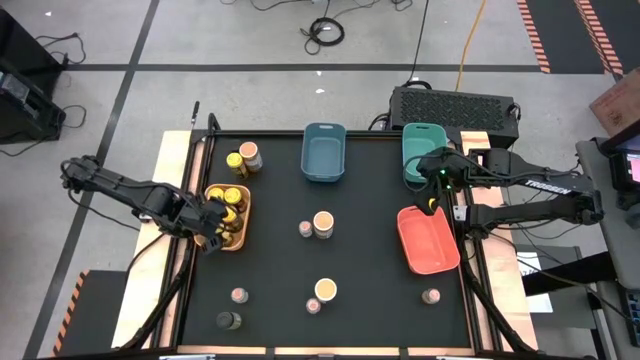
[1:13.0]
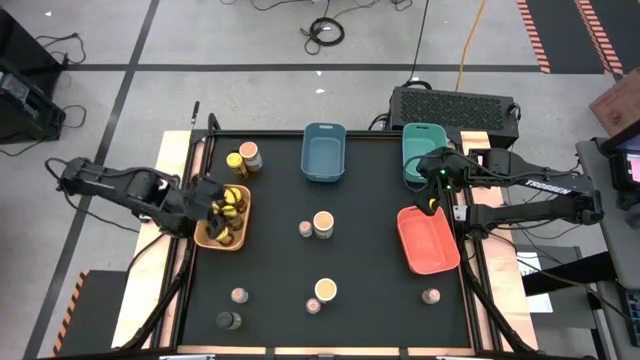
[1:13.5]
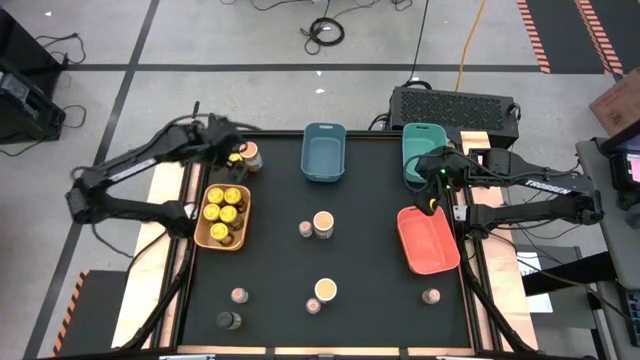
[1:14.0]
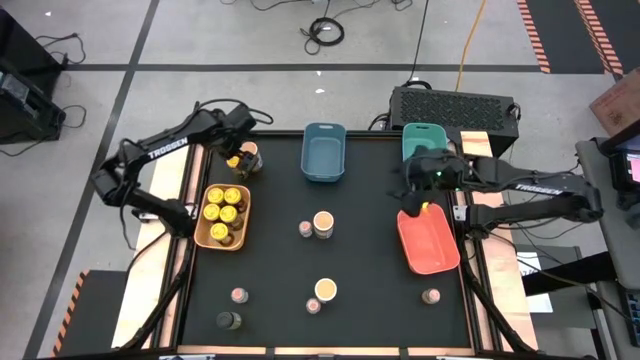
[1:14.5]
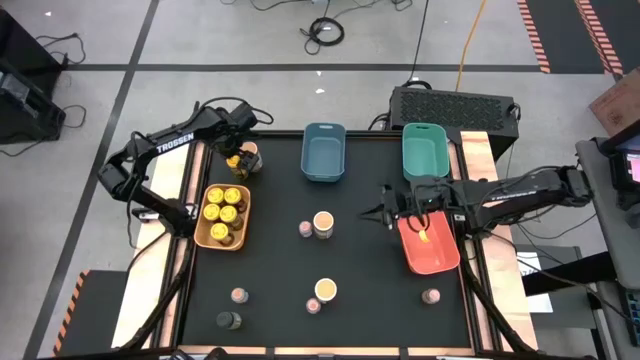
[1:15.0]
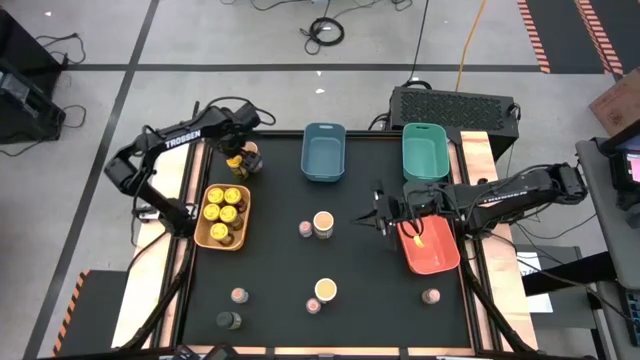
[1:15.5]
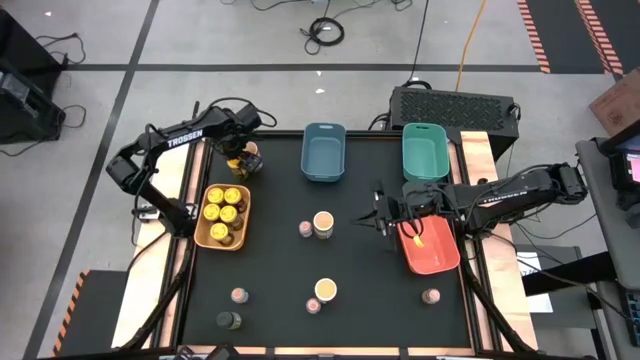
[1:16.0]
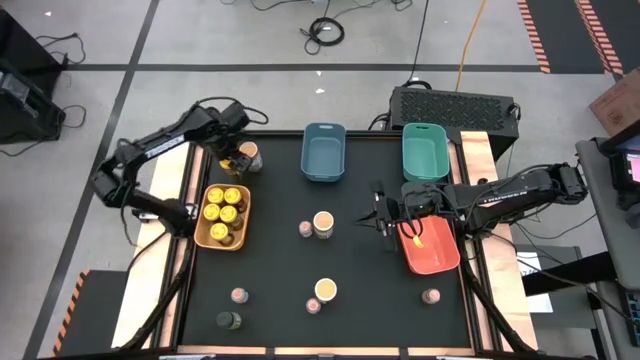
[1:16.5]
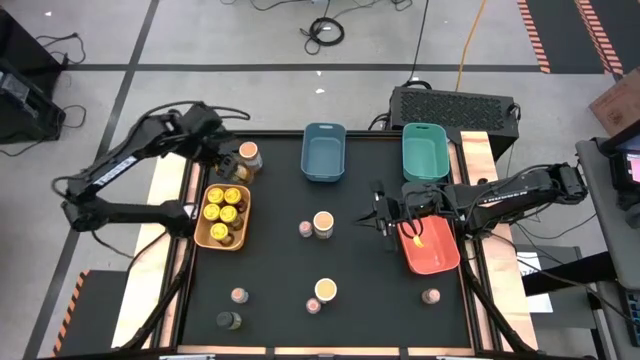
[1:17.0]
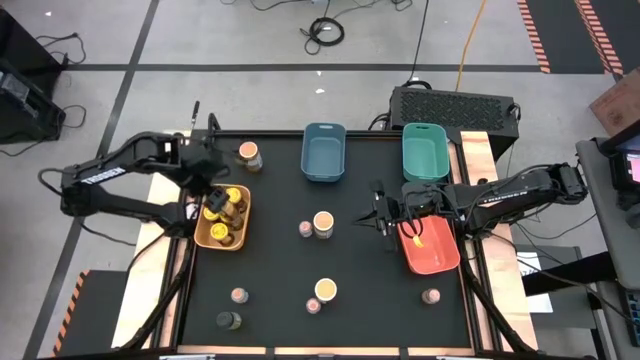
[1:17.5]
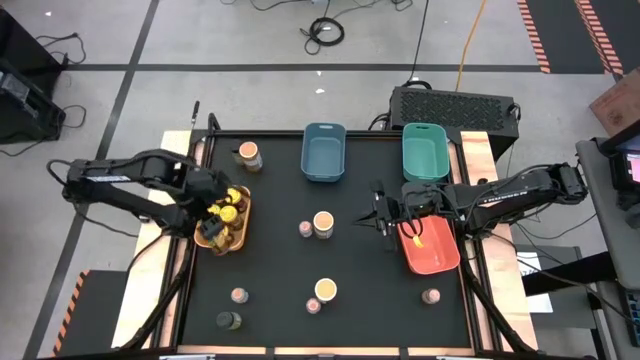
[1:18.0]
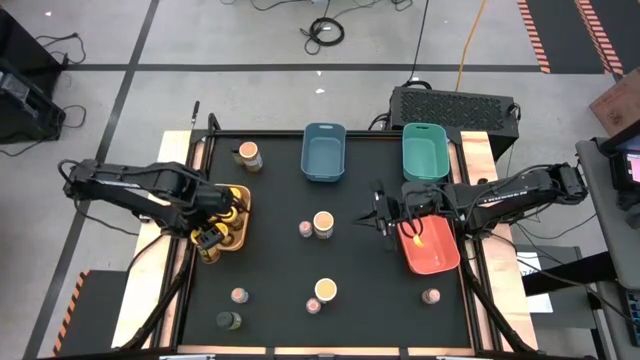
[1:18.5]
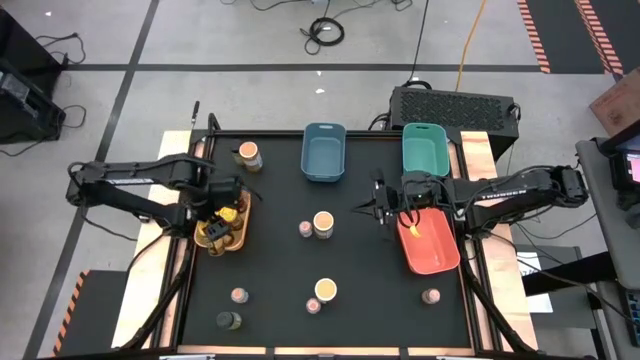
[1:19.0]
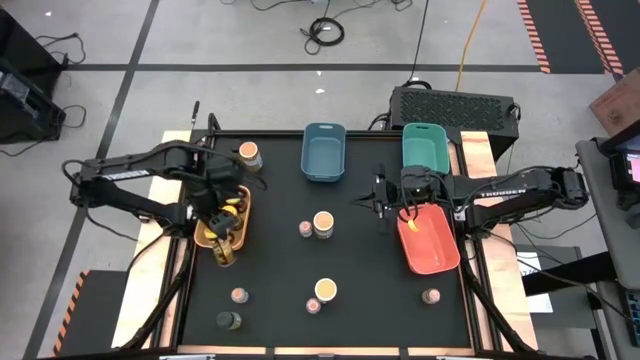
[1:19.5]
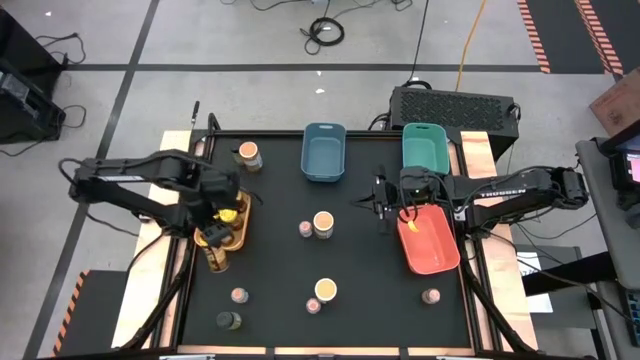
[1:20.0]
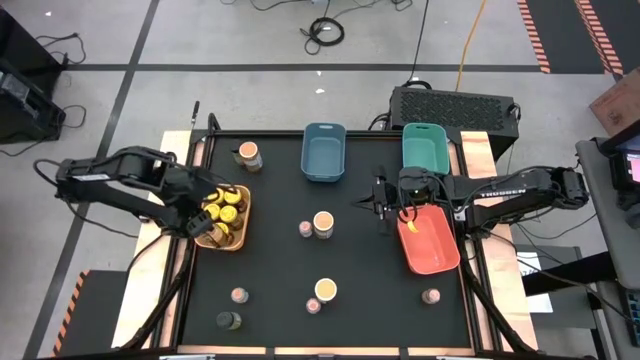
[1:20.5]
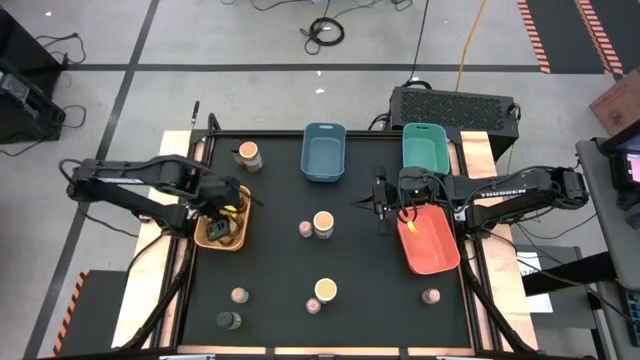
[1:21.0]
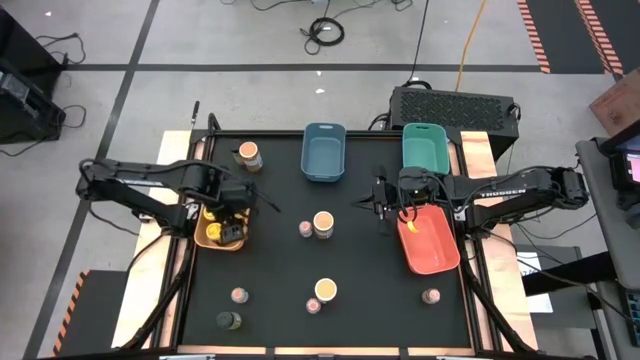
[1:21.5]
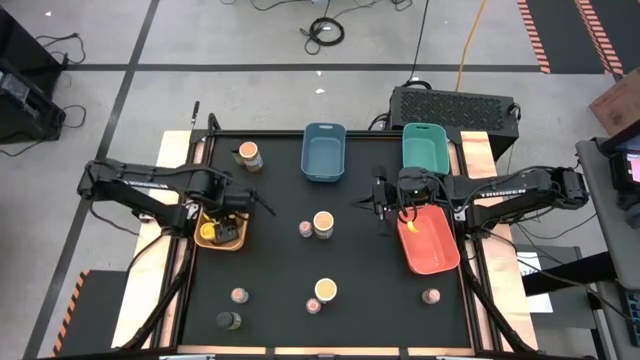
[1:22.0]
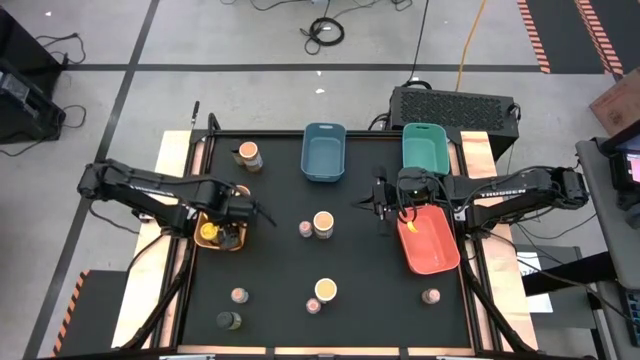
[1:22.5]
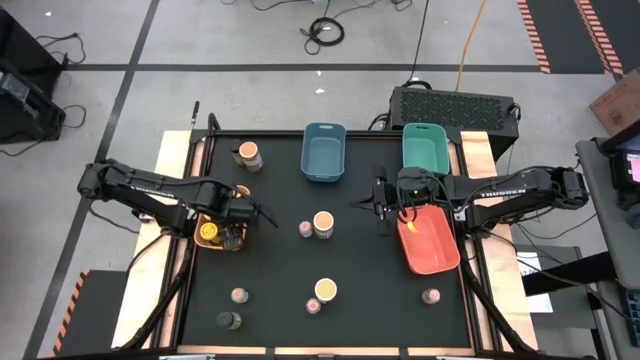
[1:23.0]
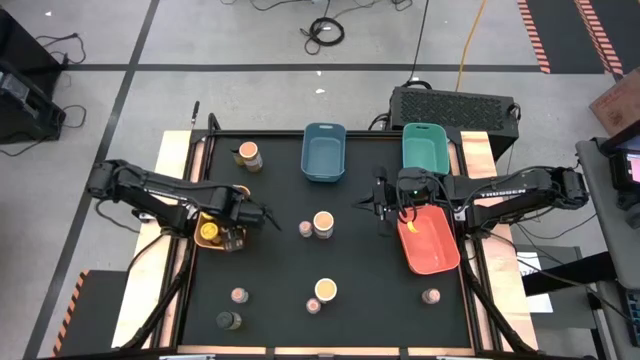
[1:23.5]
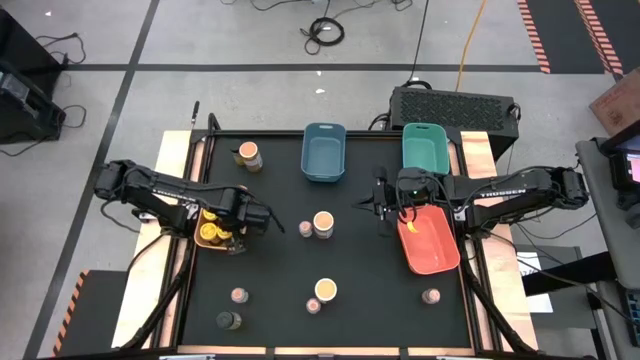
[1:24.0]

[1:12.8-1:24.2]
Task: Sort spices by type
Put the yellow seasoning can into the yellow bin

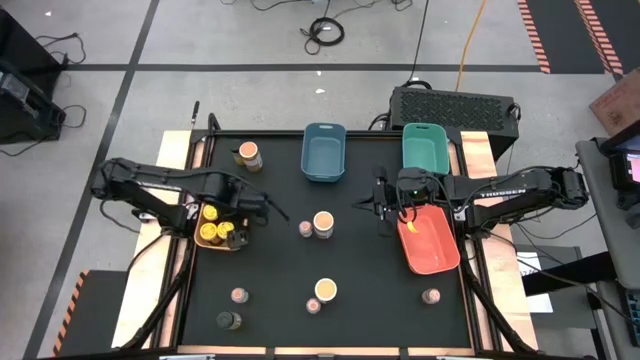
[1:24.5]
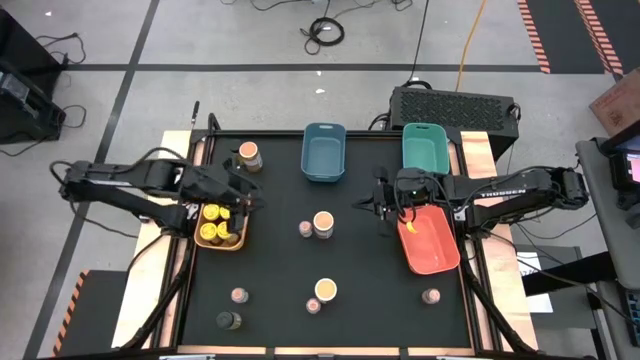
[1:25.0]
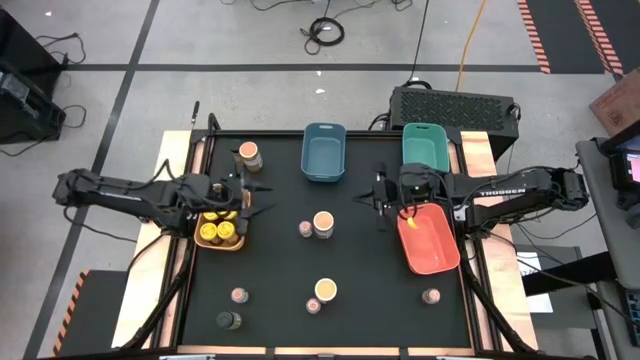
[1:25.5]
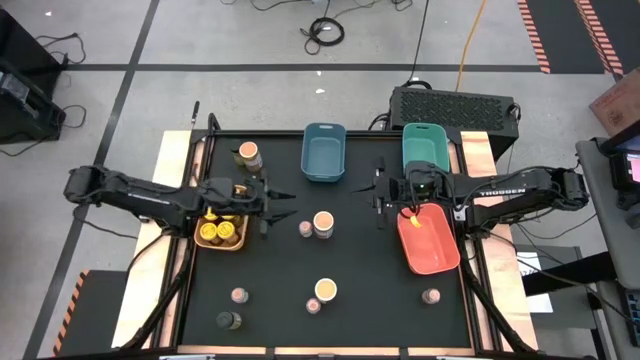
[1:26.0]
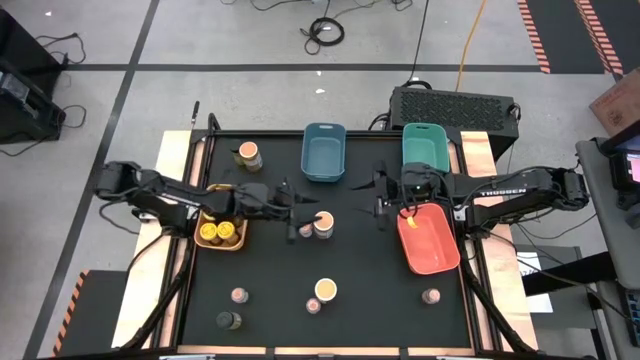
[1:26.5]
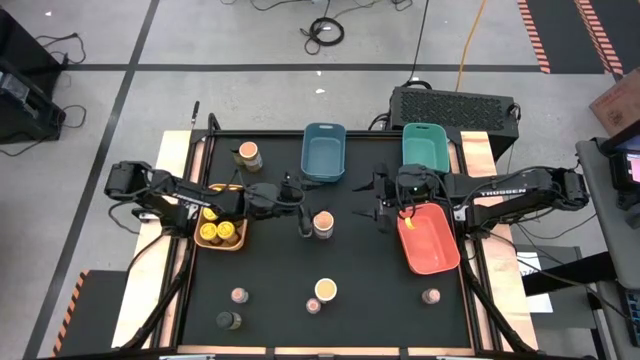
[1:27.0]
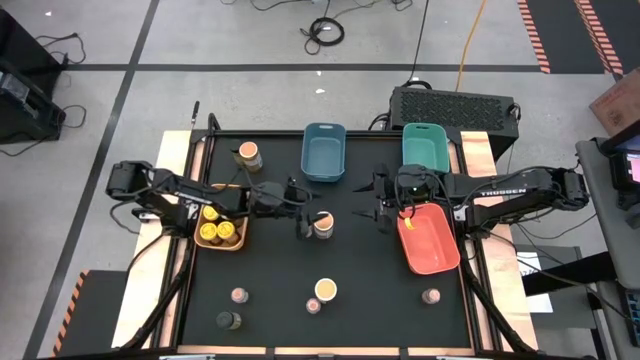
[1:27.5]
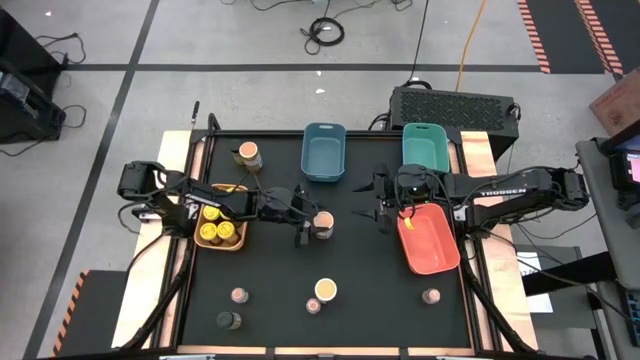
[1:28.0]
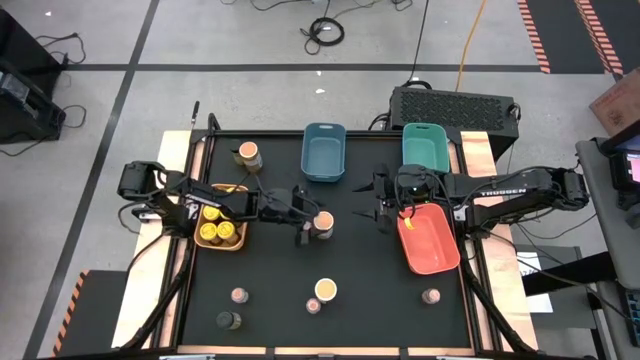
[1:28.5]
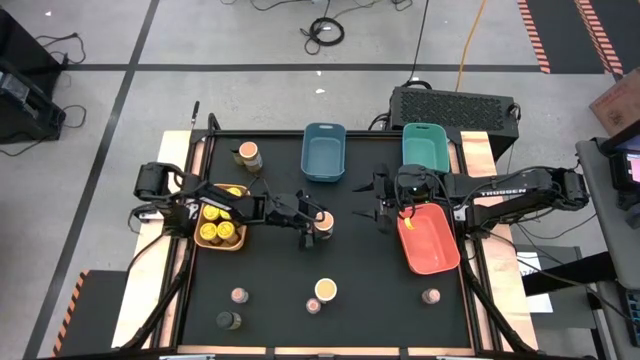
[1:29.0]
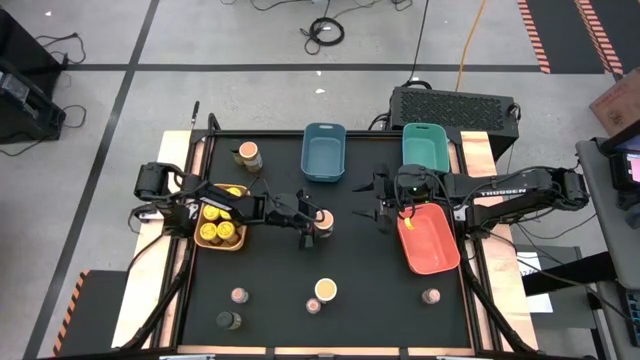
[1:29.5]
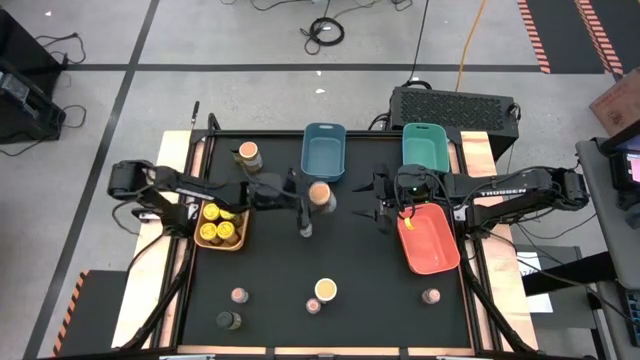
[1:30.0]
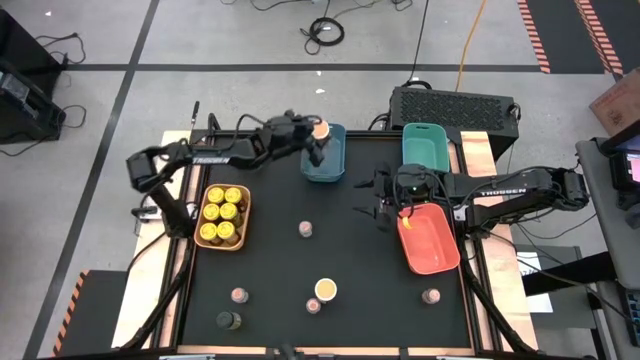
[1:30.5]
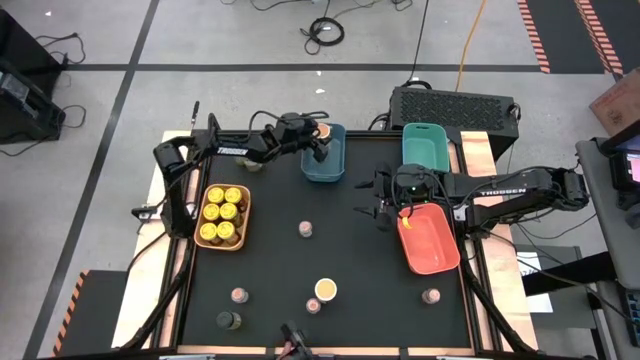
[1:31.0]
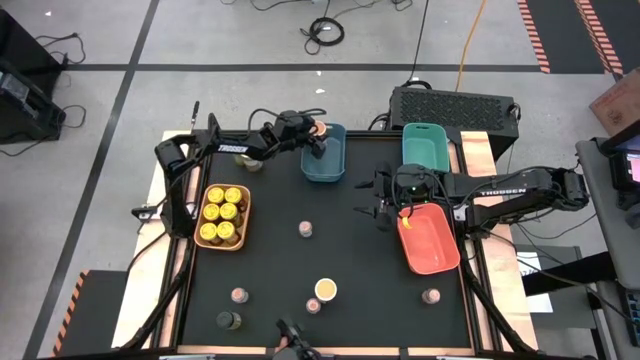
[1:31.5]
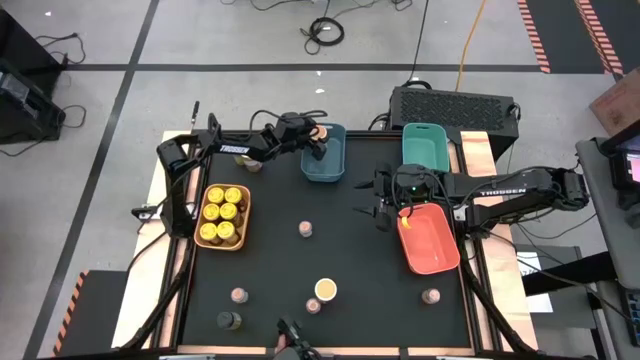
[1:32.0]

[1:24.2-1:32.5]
Put the large brown seasoning bottle into the blue bin

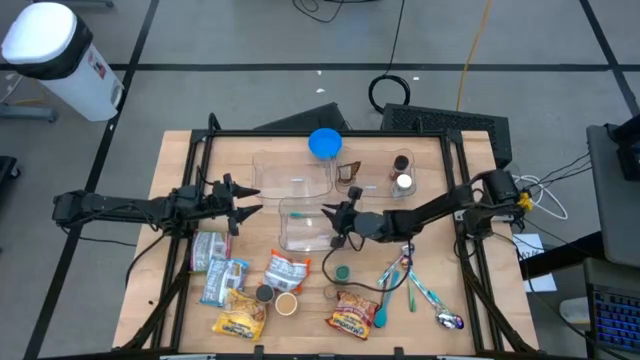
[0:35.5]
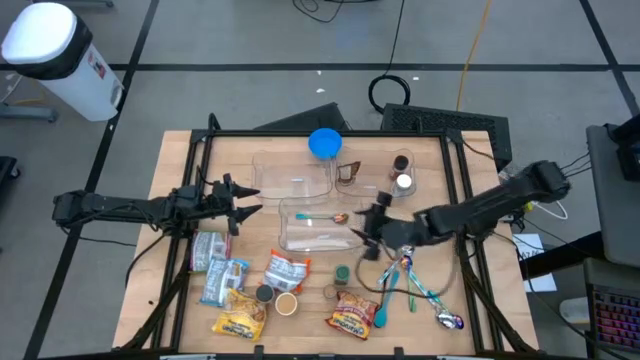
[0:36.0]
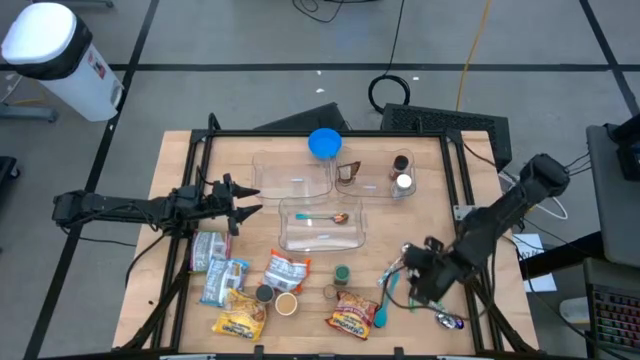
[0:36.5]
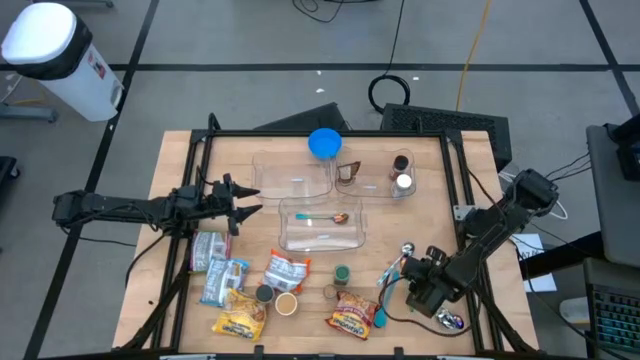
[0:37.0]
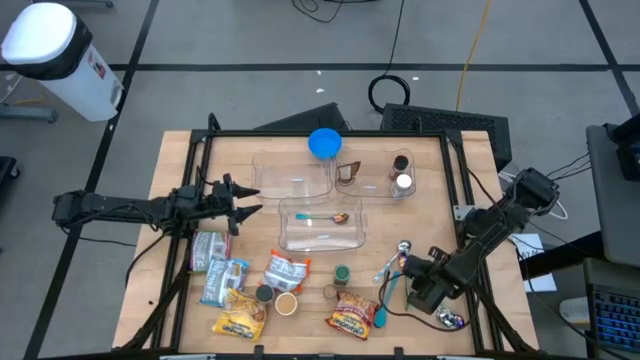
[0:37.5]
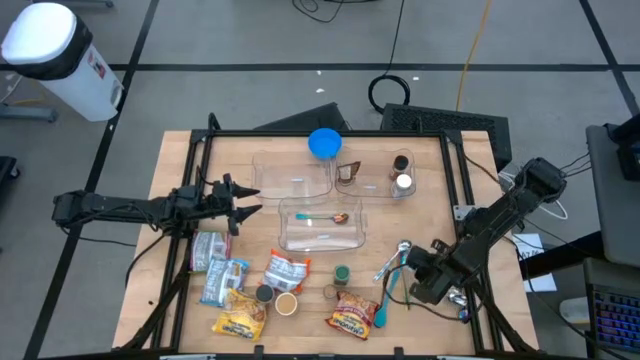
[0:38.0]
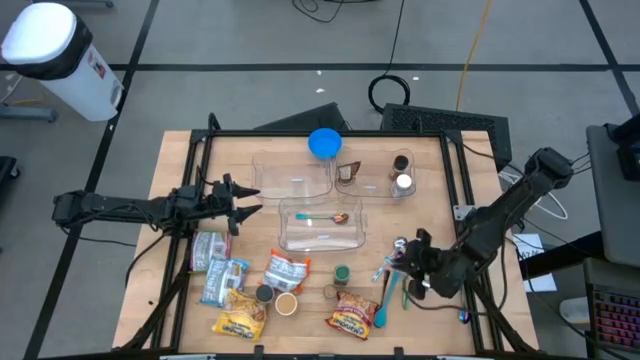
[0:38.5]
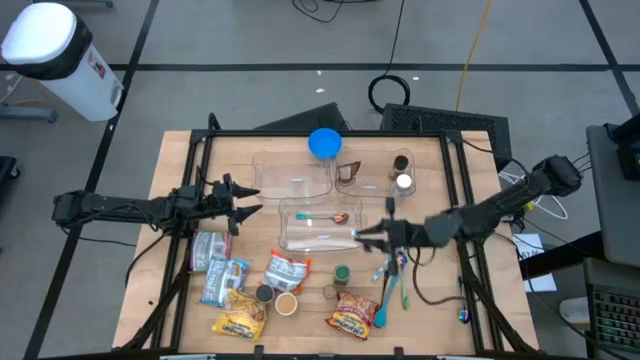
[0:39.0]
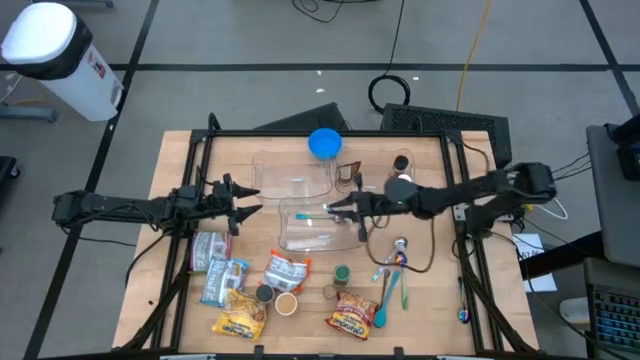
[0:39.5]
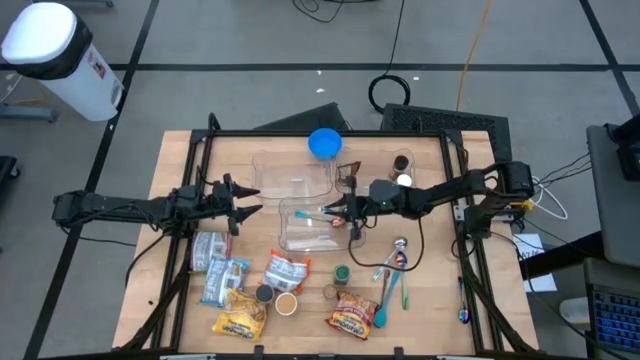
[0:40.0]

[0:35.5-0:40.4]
Task: Pick & Place Food Item
Put the bottom blue patterned spoon into the bottom transparent bin
